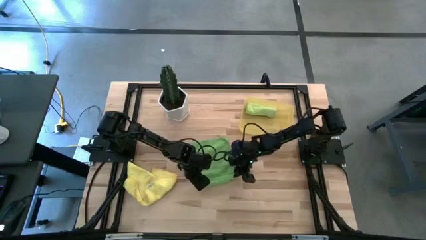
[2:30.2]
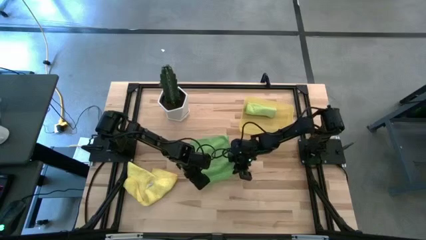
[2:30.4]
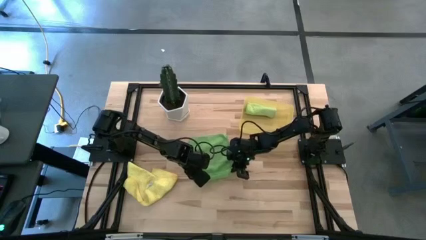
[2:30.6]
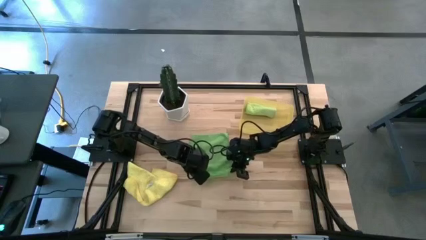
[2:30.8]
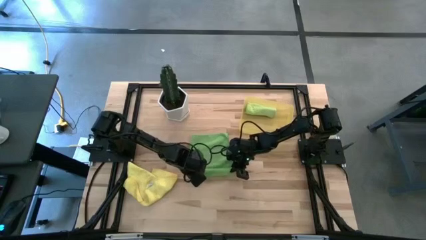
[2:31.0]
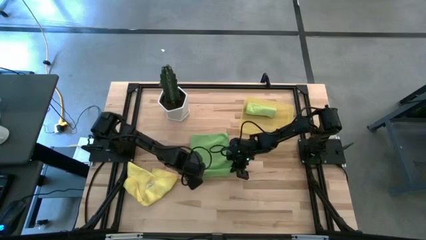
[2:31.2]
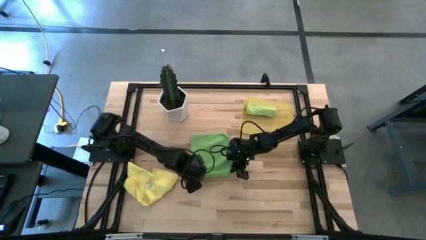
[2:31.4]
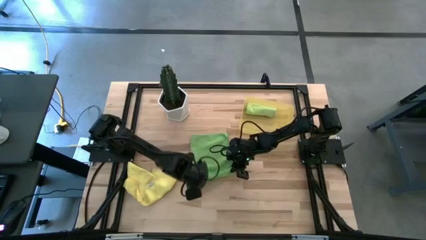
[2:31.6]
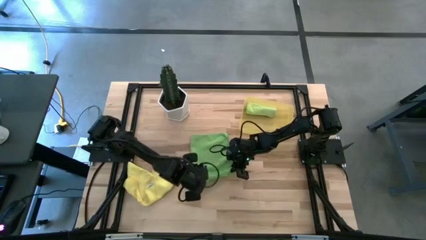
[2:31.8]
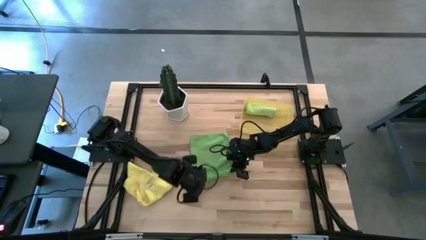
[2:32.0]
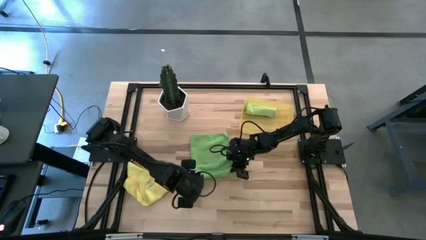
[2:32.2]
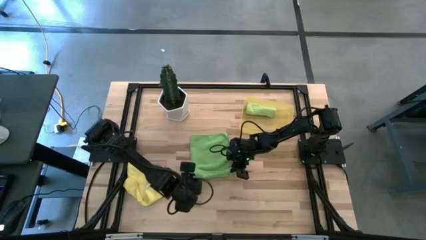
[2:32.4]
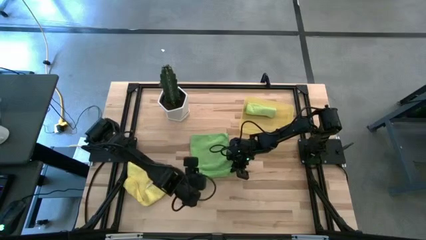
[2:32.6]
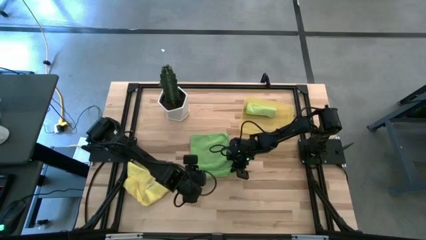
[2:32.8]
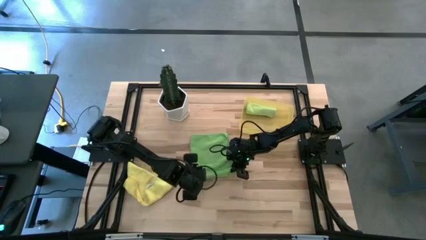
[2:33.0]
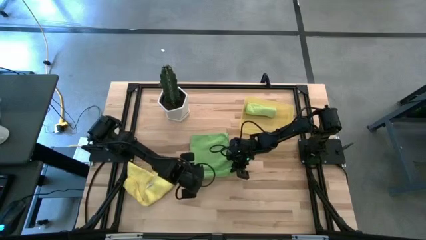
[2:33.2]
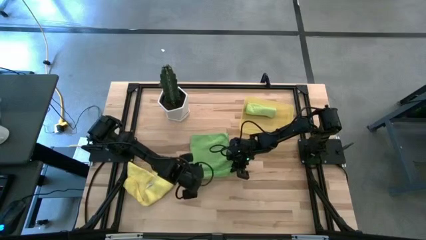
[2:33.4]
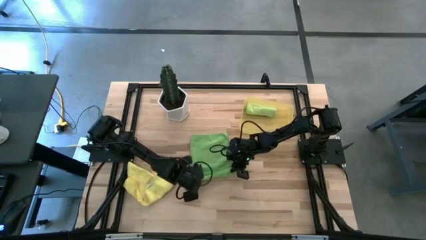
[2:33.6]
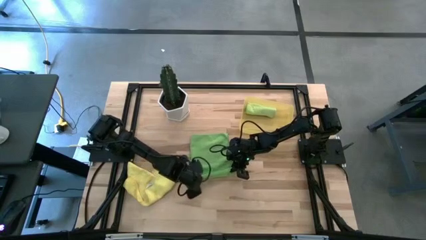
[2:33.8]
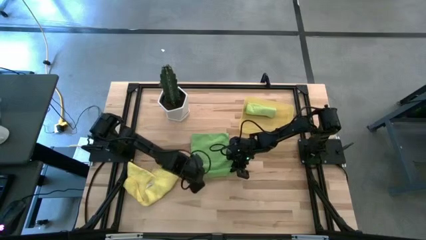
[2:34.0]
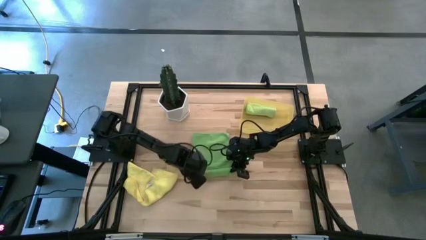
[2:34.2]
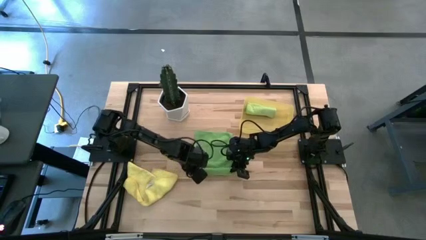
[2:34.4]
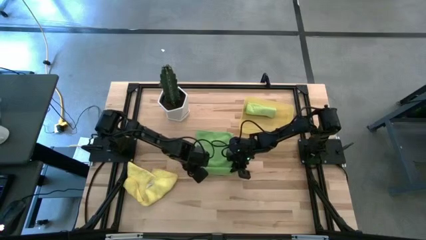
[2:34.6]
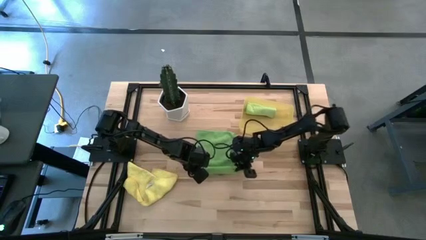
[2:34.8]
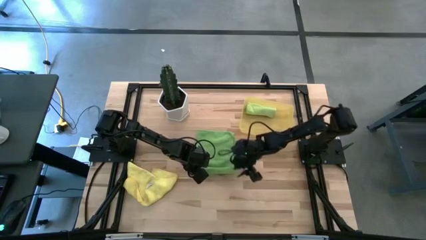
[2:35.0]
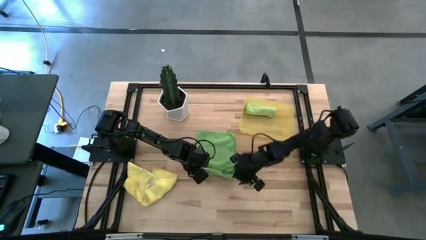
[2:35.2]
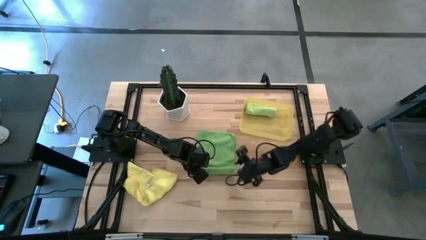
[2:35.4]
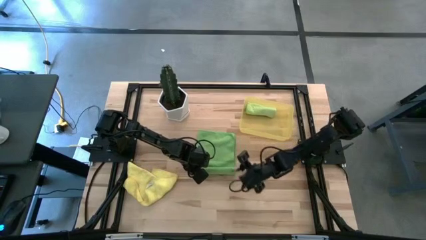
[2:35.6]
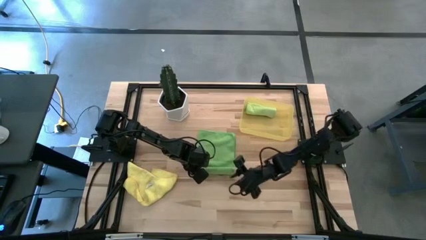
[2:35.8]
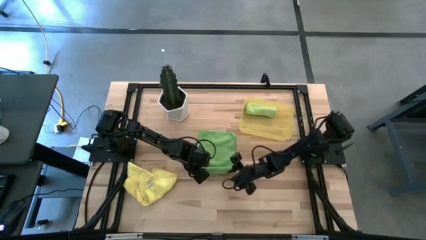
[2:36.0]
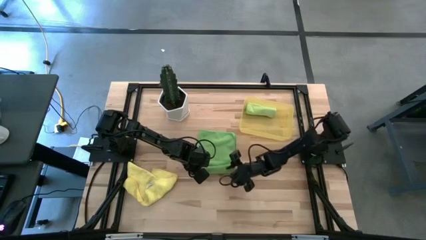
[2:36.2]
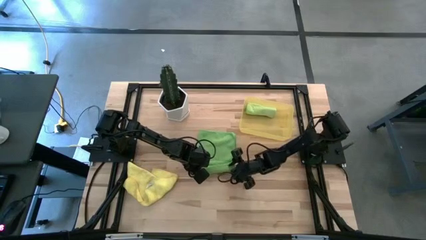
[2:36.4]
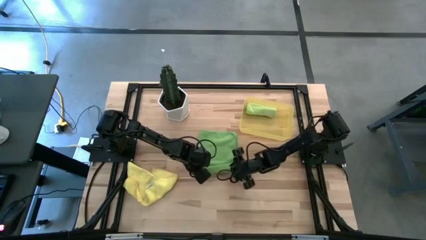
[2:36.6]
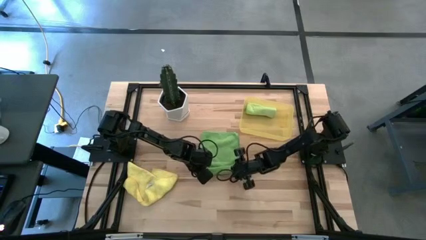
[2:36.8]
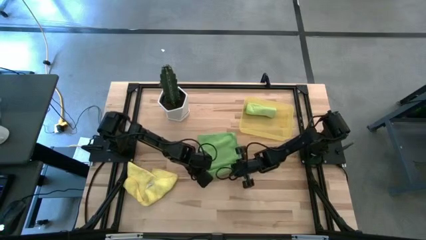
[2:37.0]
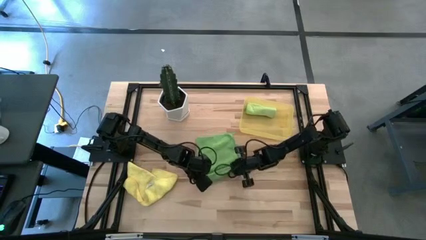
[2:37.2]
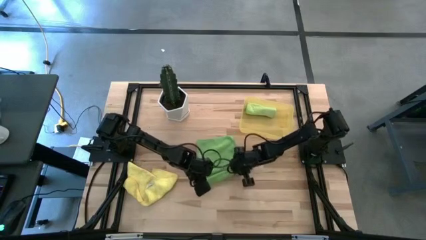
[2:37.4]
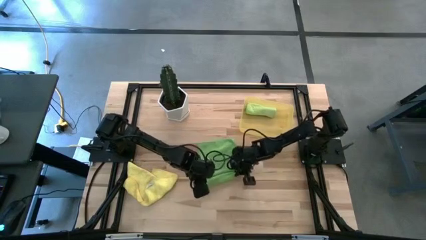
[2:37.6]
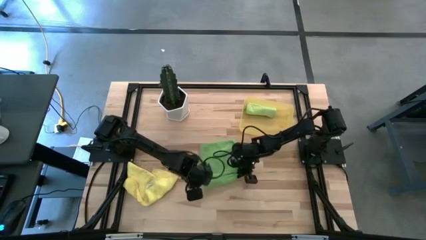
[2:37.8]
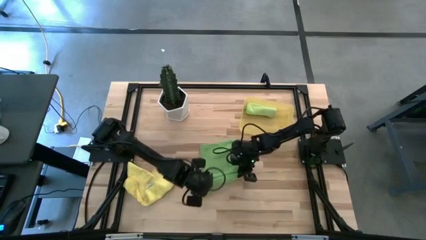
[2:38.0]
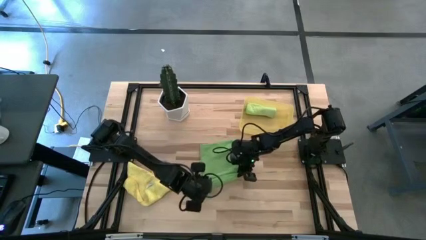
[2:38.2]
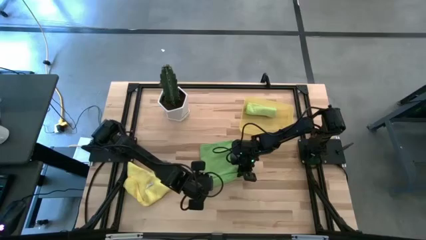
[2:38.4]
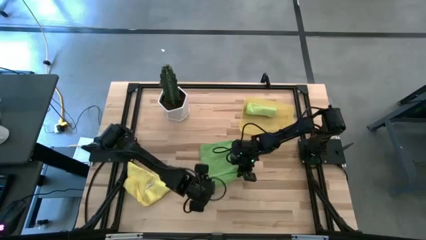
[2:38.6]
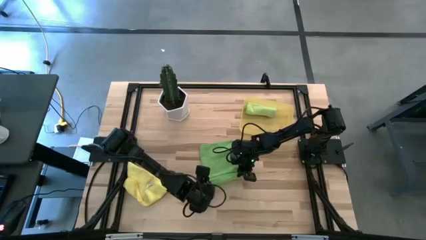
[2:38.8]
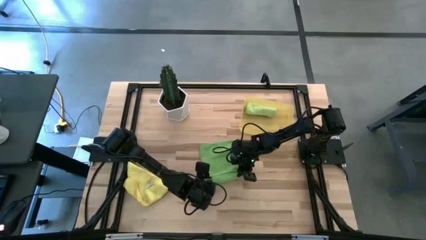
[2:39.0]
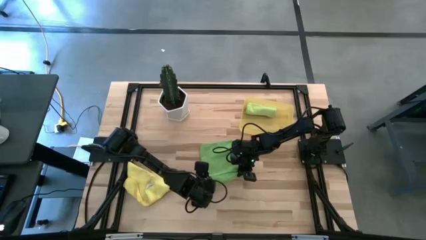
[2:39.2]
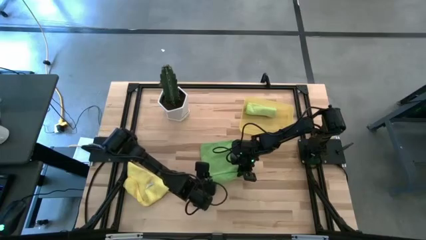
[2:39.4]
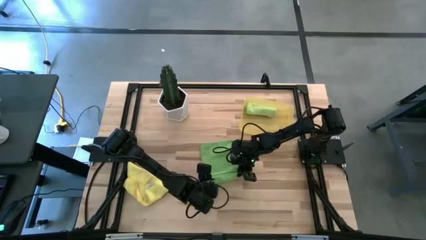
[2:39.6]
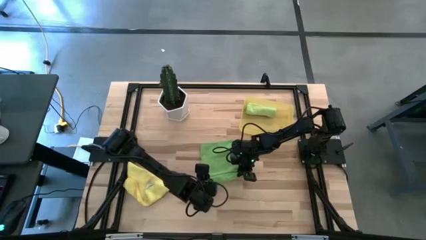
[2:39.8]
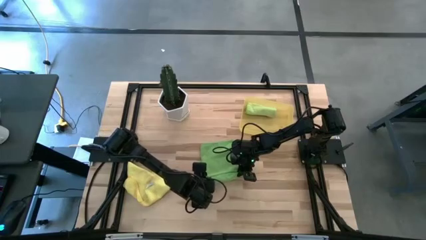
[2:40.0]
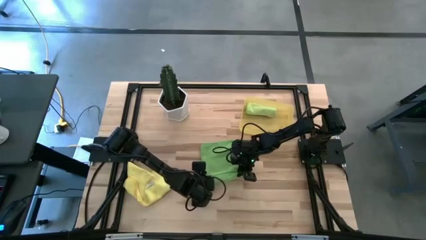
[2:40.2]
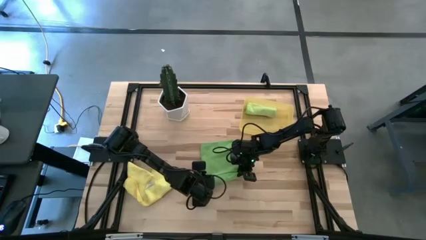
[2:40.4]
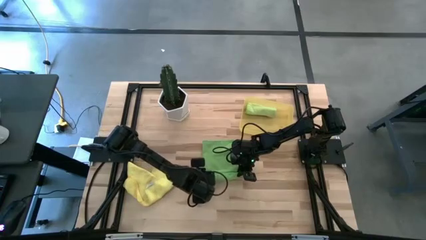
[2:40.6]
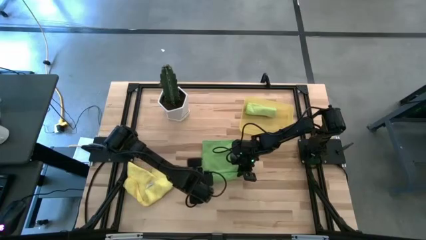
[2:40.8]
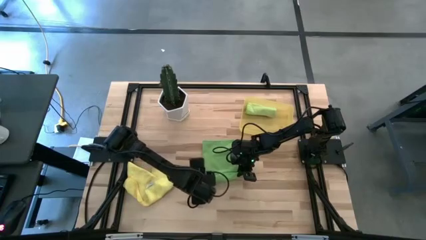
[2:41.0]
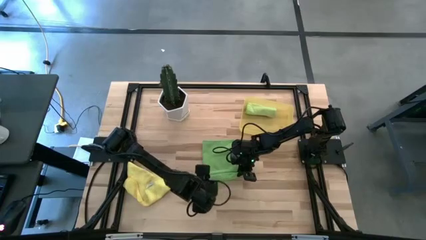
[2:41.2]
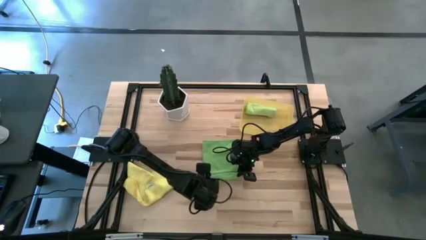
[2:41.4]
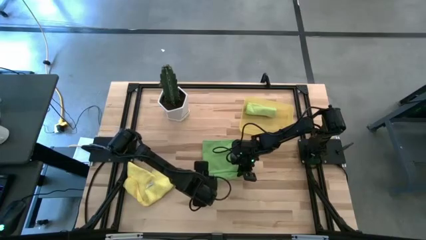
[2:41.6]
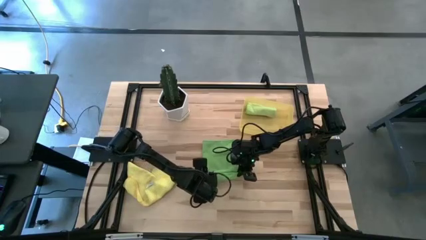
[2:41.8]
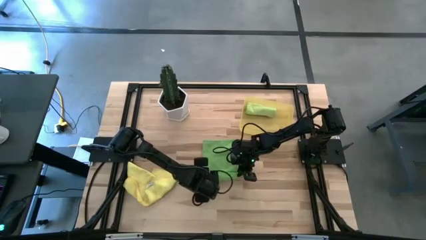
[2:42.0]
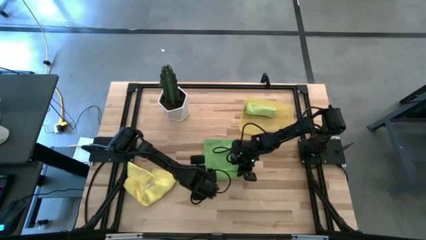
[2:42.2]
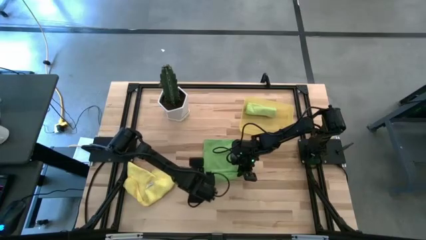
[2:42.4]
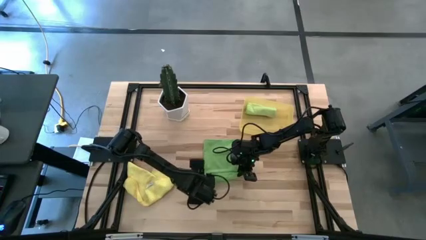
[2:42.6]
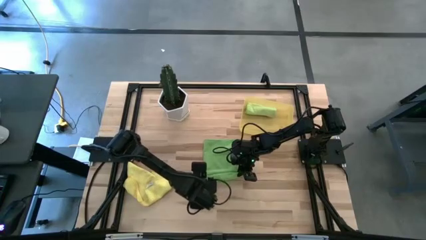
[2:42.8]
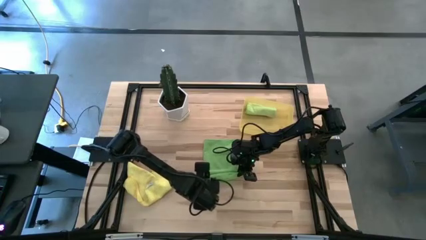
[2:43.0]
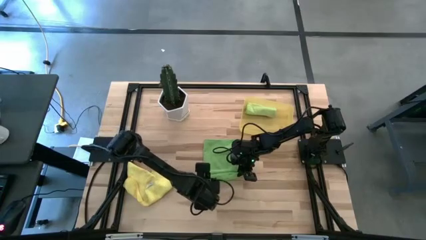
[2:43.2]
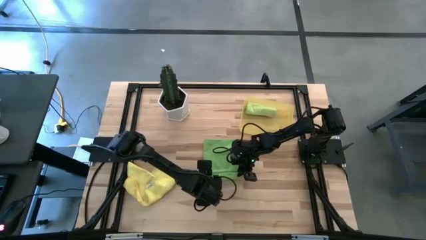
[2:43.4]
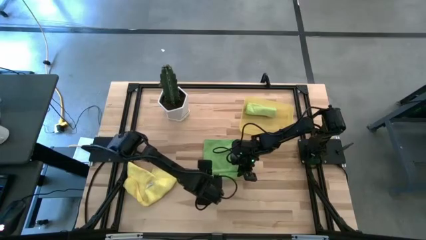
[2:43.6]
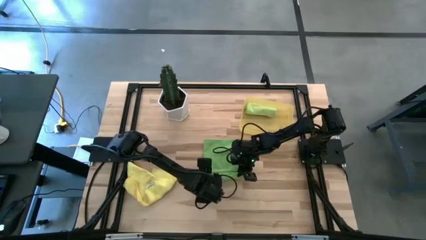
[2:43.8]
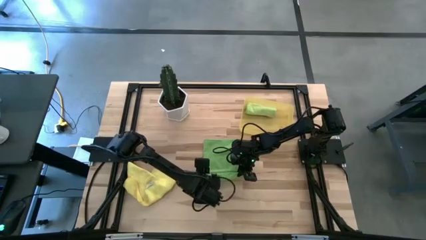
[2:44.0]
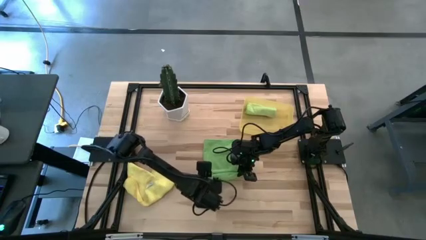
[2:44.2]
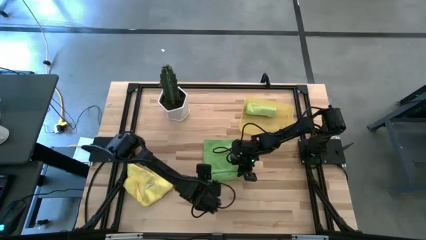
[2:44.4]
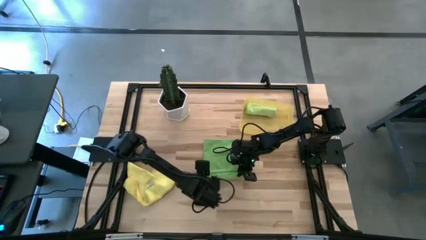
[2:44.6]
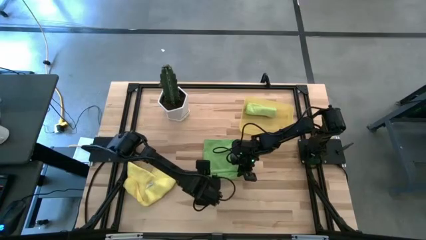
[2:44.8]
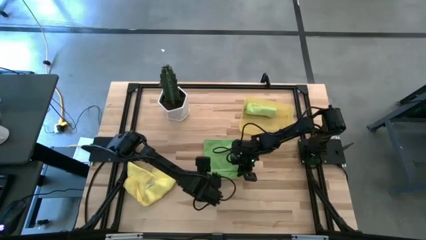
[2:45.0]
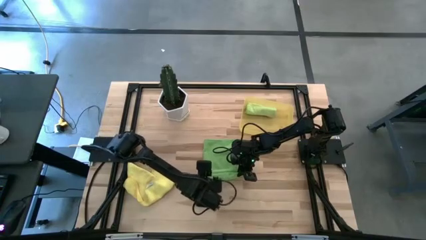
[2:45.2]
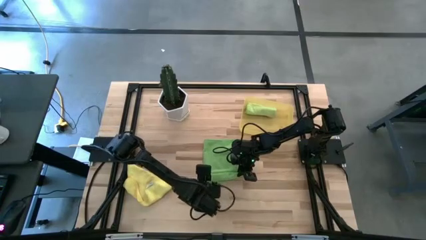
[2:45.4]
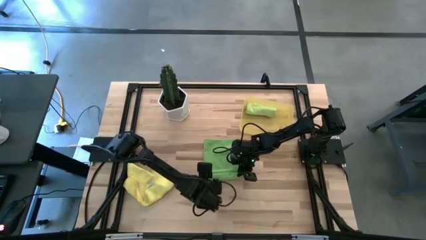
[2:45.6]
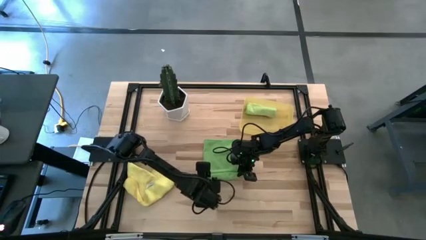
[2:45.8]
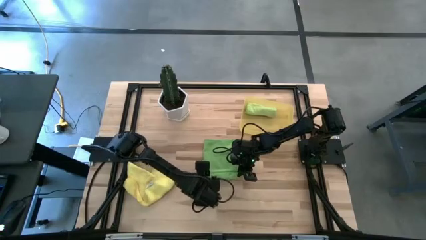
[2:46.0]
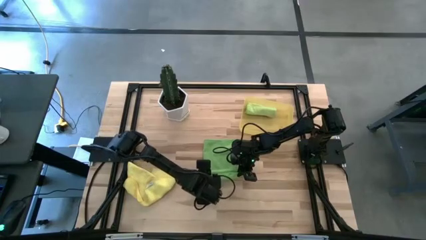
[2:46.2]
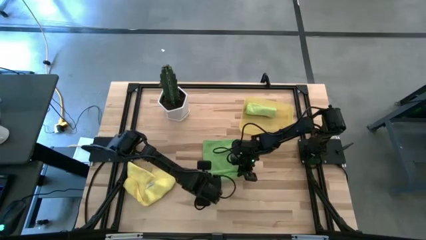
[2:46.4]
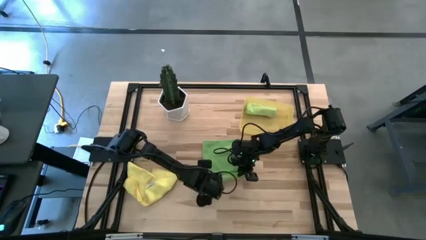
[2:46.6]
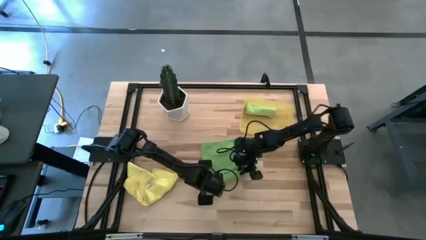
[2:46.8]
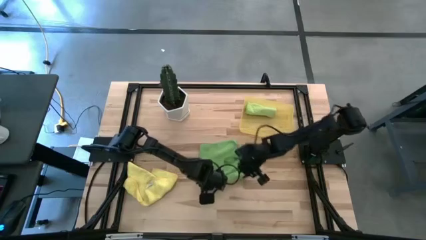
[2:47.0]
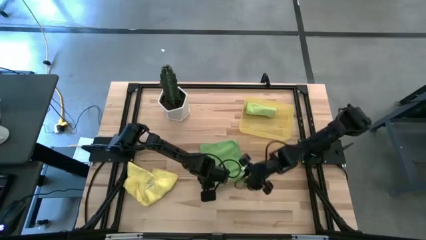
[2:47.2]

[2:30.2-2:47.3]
Task: Roll microfiber towels into tight, uniform cylinder then place into a basket
Roll the green microfiber cloth
